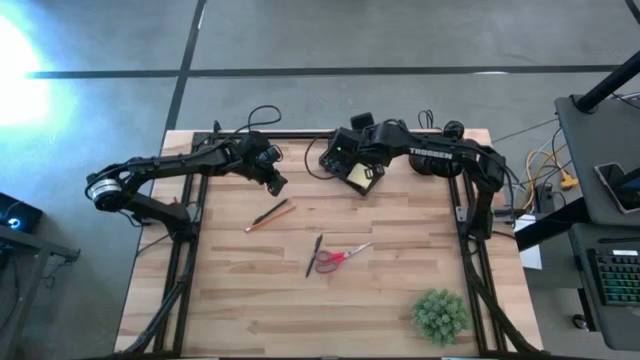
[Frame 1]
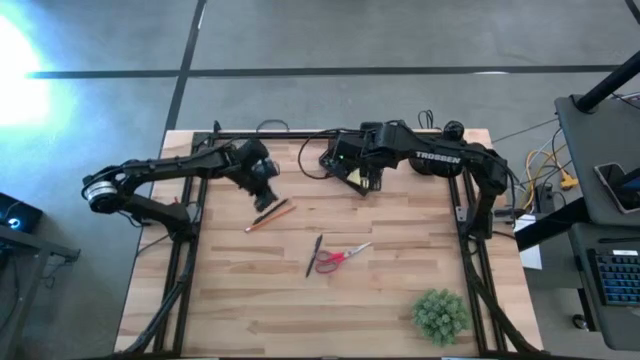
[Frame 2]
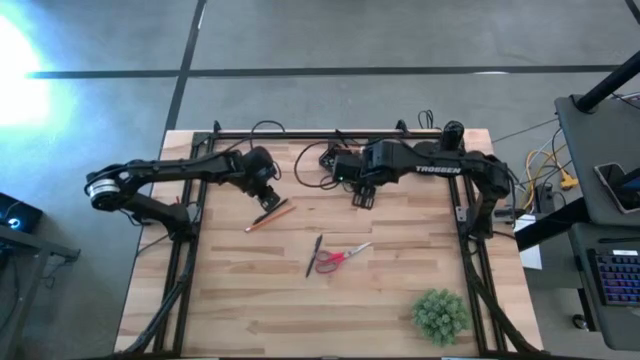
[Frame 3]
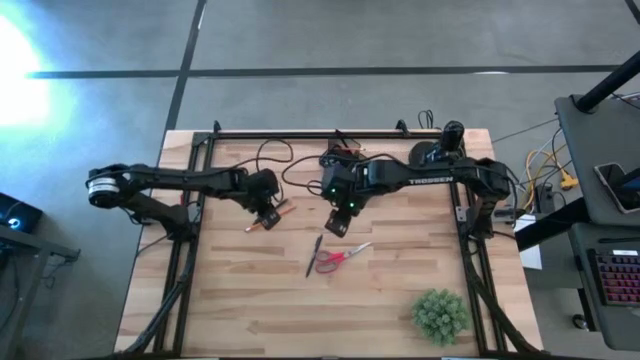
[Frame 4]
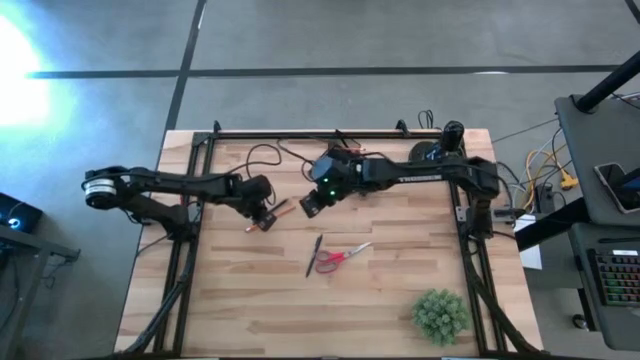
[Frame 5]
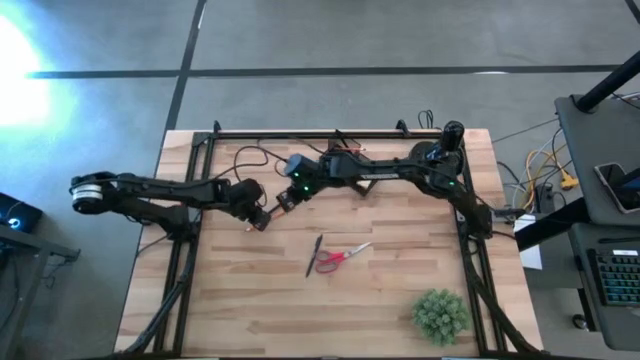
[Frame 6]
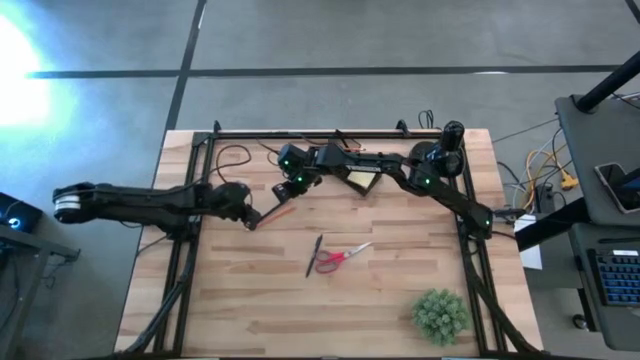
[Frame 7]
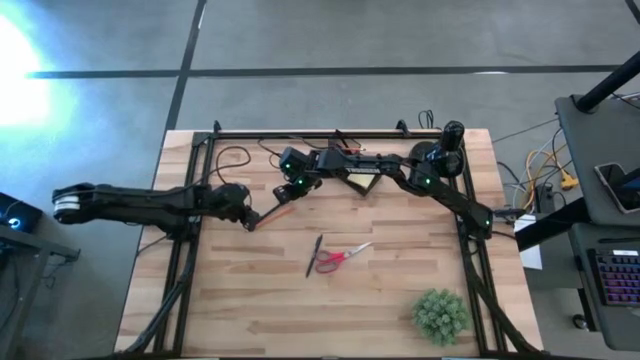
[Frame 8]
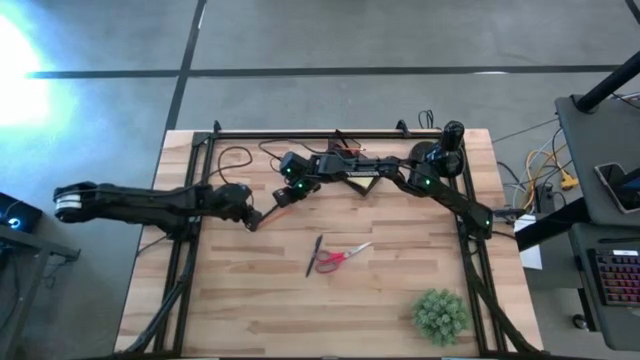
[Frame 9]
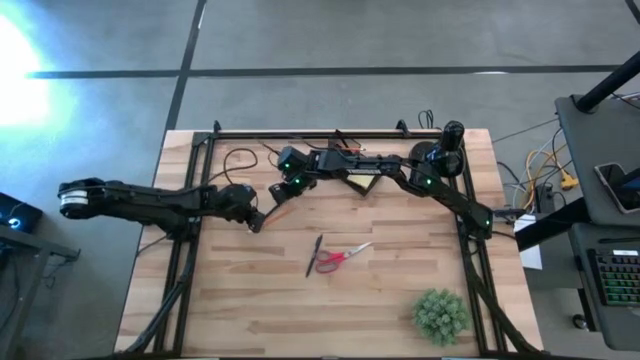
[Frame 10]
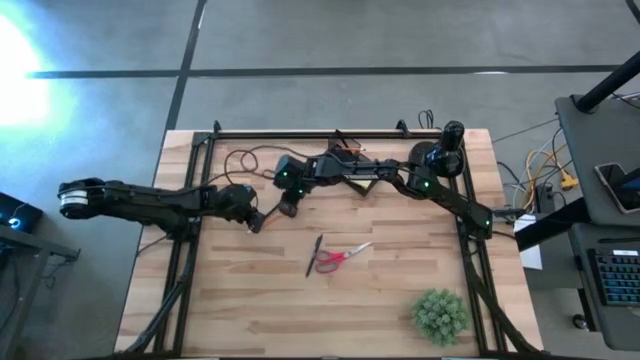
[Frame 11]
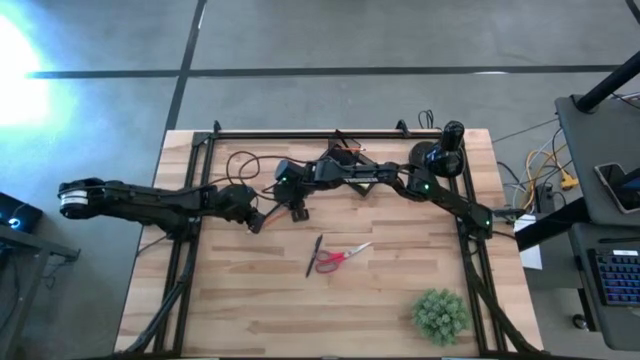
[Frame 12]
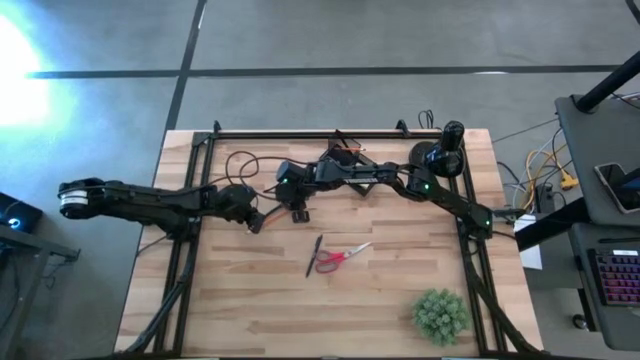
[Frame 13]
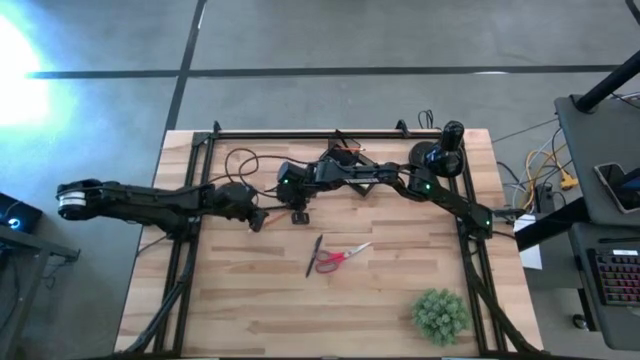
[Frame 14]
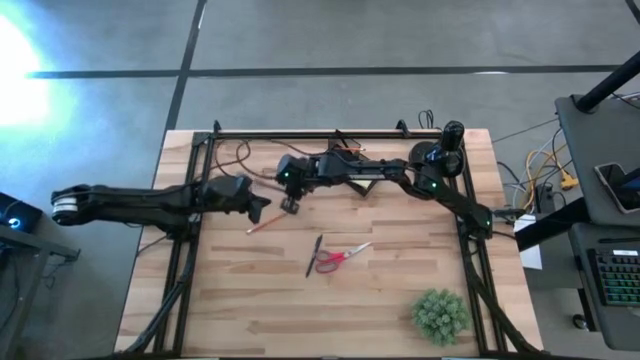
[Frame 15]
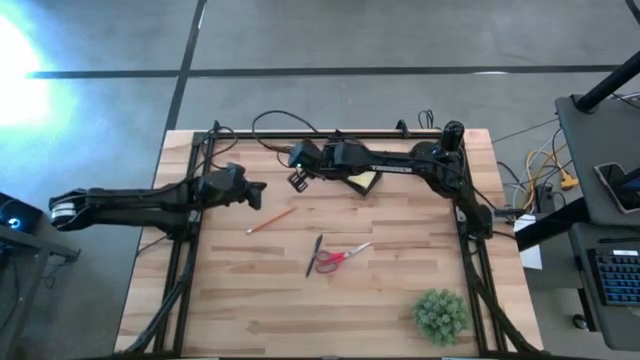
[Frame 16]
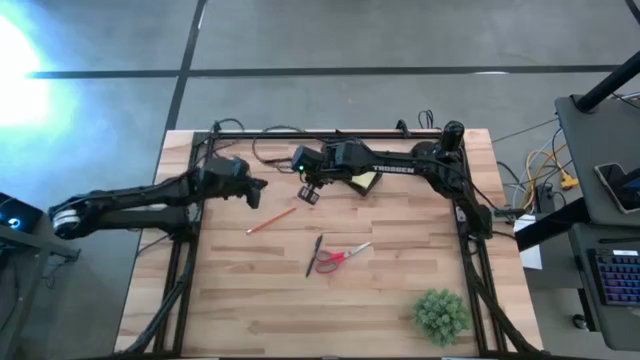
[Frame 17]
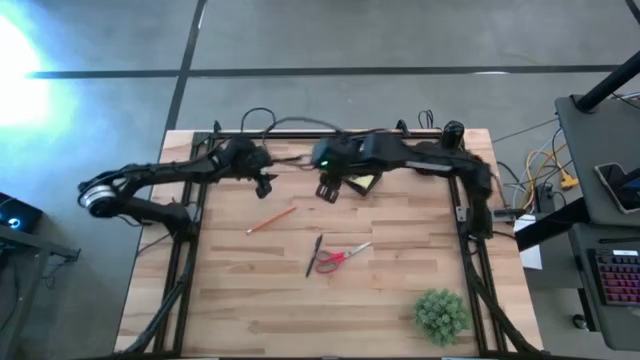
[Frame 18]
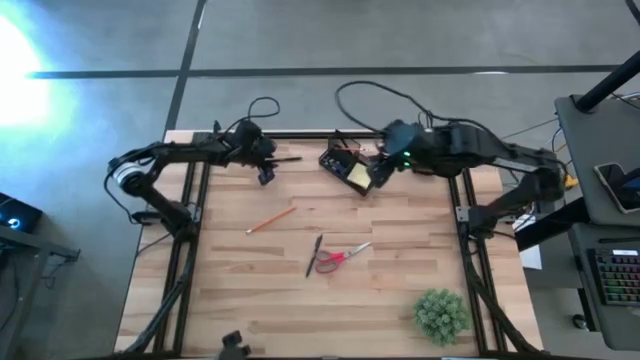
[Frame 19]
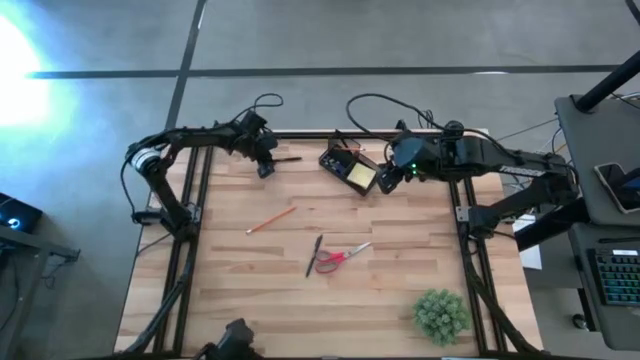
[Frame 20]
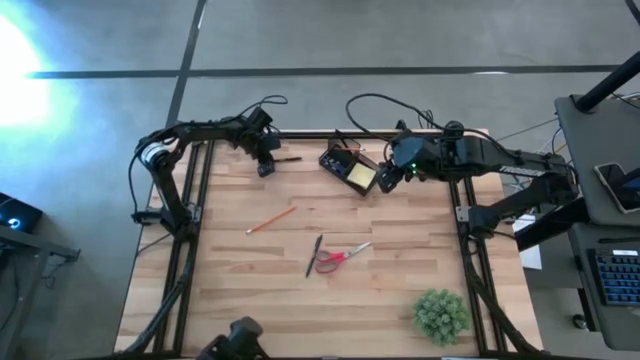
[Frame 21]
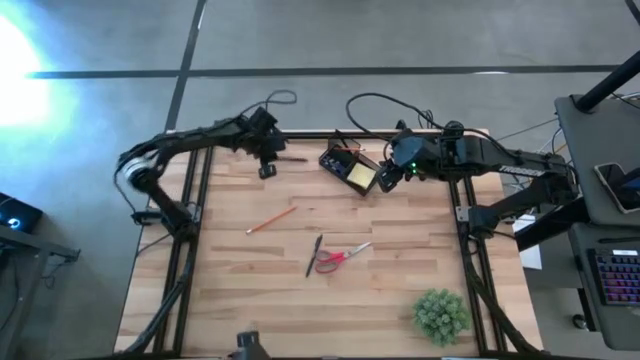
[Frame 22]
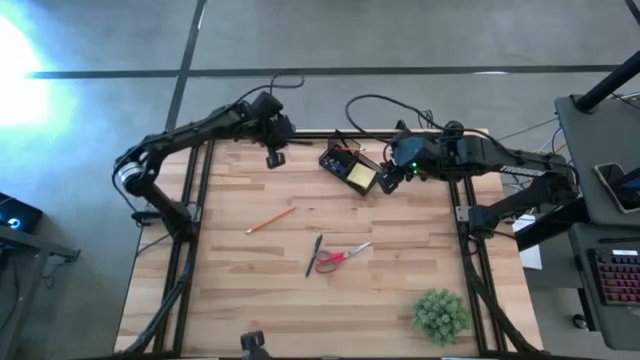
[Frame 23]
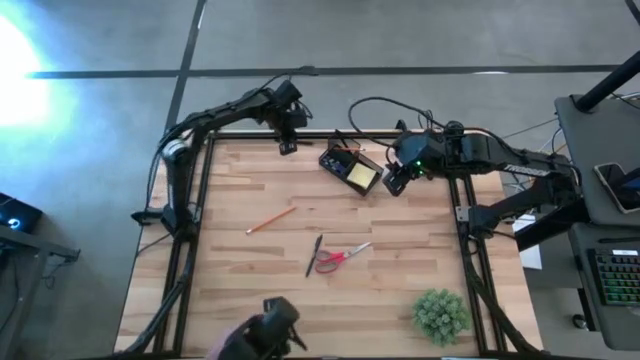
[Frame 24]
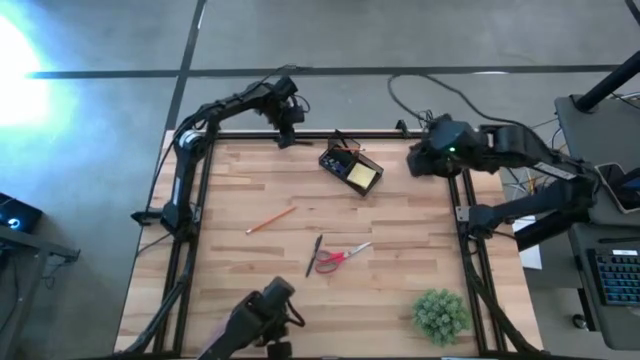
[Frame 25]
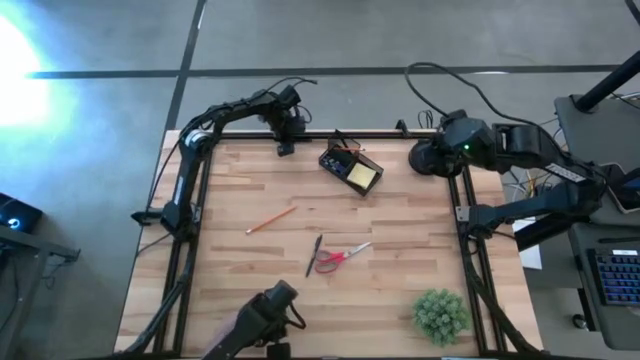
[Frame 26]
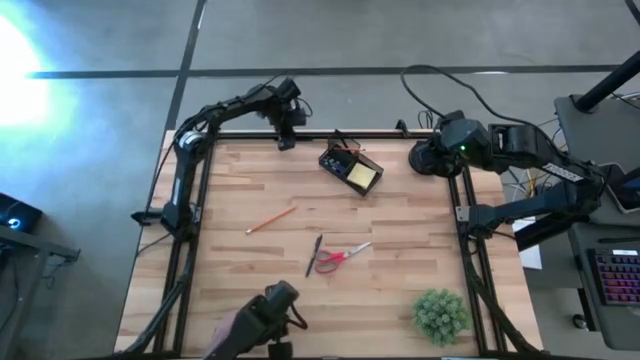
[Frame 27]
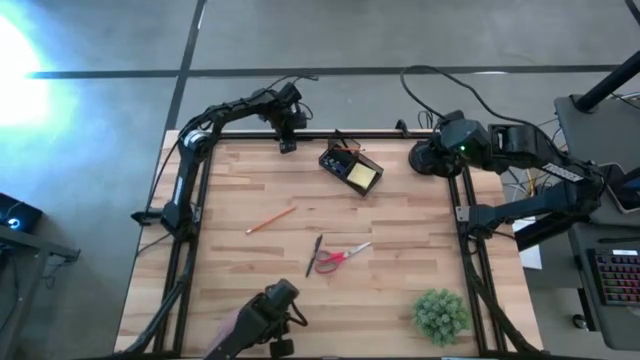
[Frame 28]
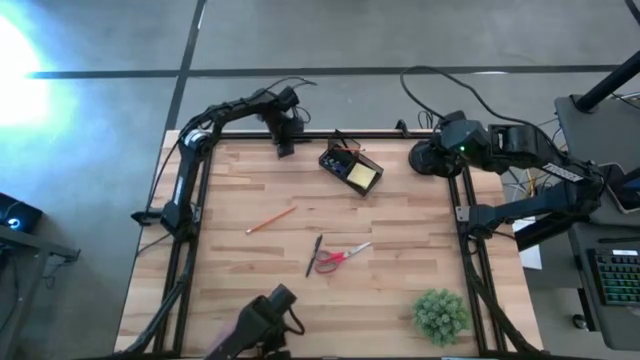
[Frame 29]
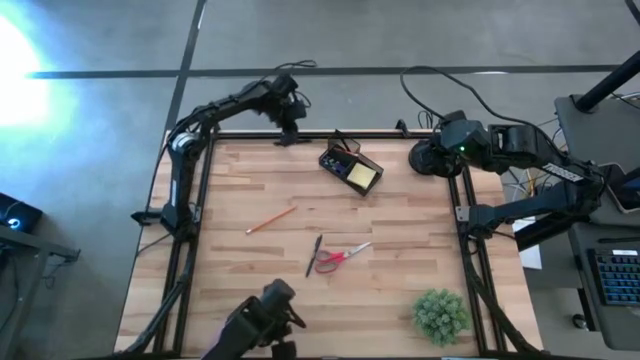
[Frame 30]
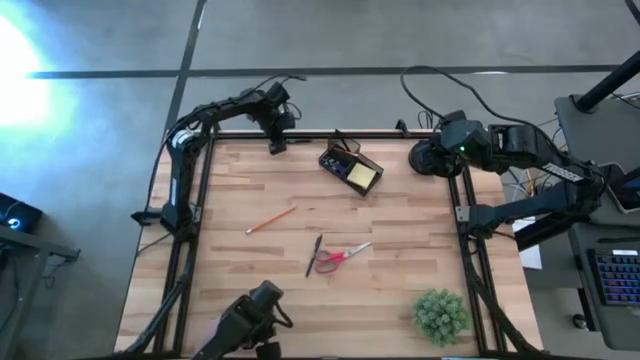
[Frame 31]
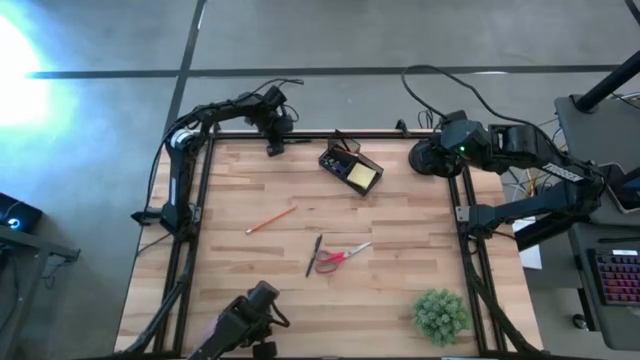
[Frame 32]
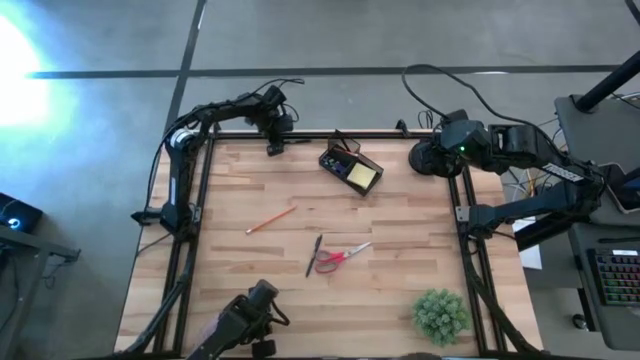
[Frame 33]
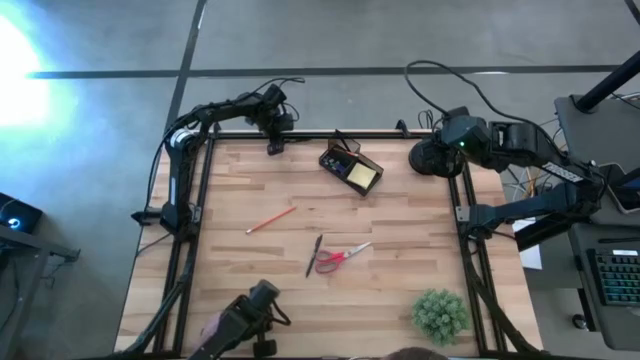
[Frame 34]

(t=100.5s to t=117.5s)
Task: Pick and place office supplies into organizer
Put the top pen into the desk organizer

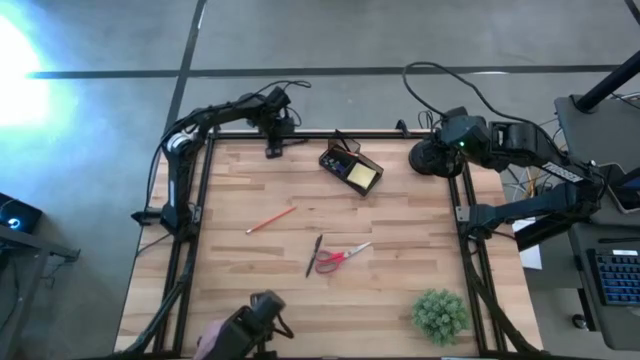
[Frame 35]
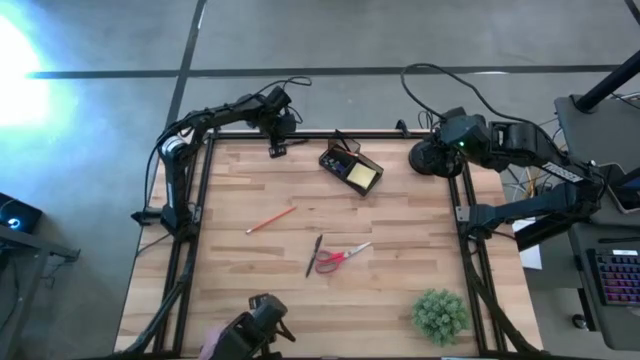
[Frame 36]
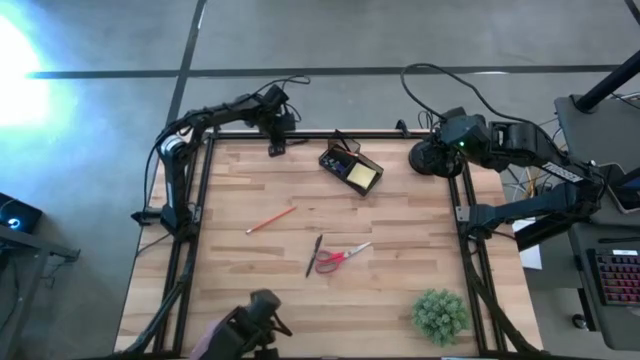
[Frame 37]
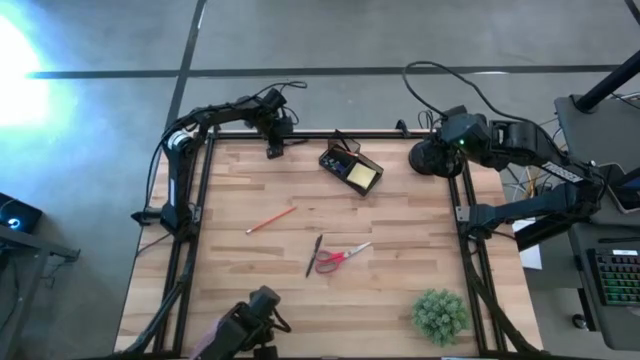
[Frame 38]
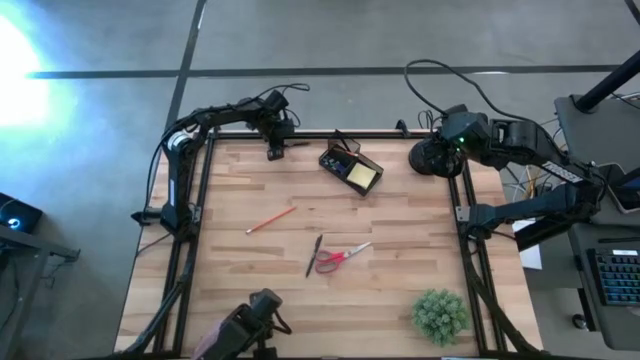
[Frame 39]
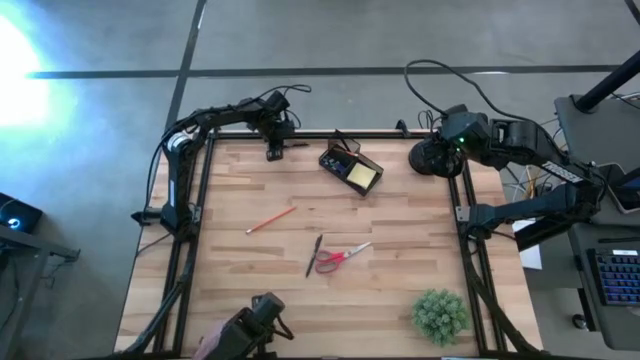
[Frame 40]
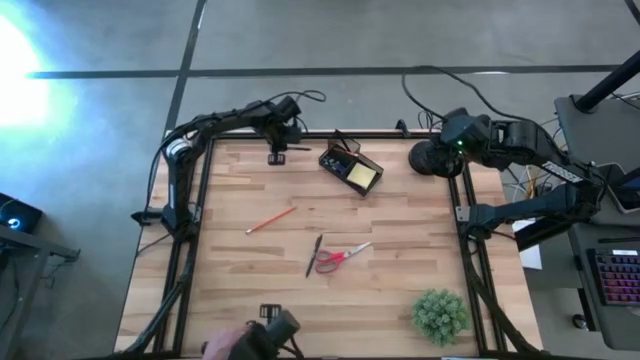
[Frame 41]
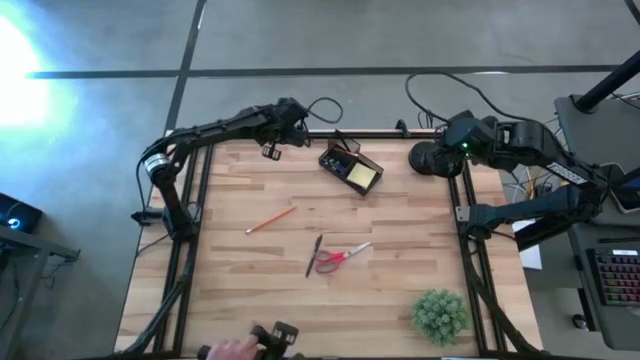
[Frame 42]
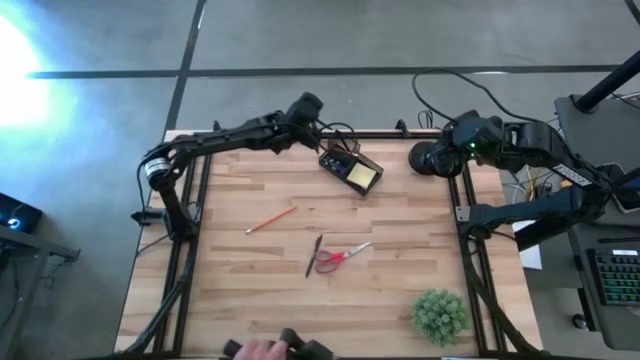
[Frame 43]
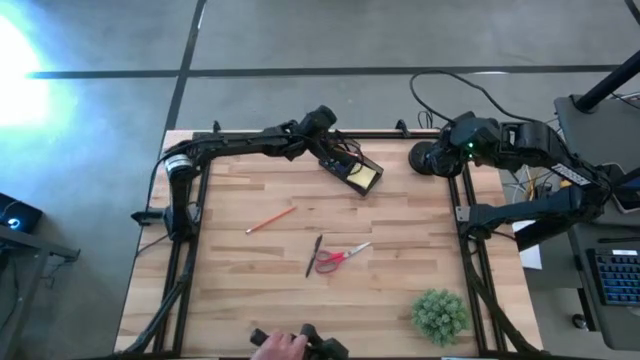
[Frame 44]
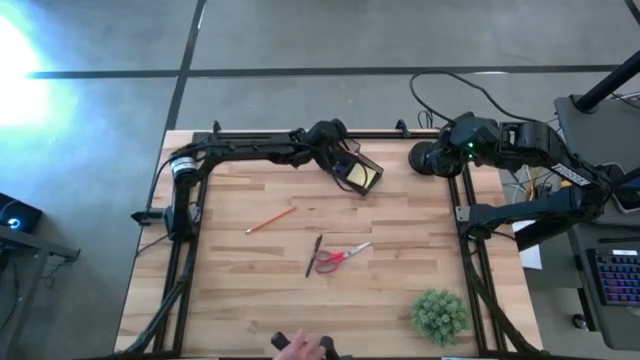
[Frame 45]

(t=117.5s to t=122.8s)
Put the top pen into the desk organizer
